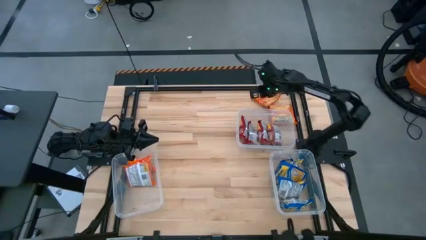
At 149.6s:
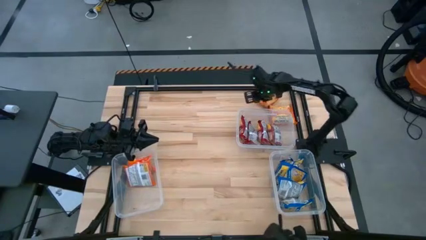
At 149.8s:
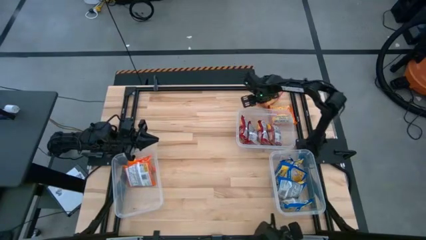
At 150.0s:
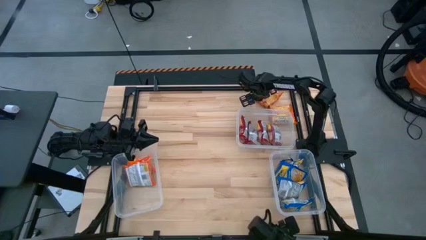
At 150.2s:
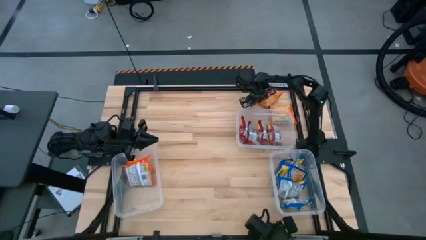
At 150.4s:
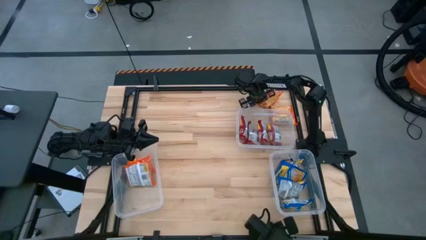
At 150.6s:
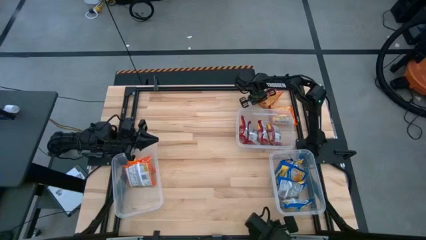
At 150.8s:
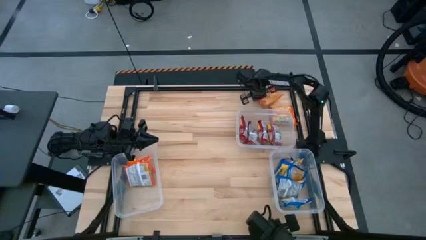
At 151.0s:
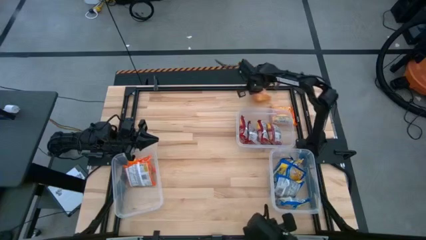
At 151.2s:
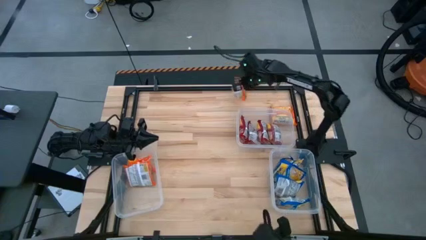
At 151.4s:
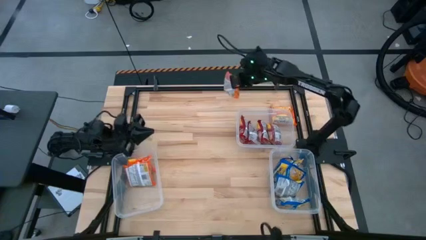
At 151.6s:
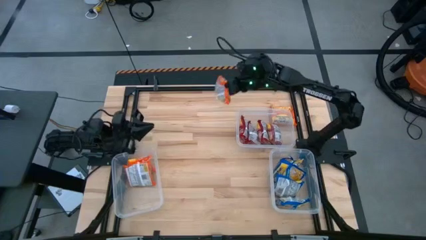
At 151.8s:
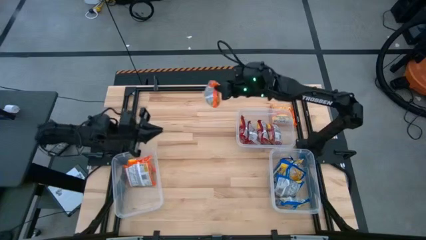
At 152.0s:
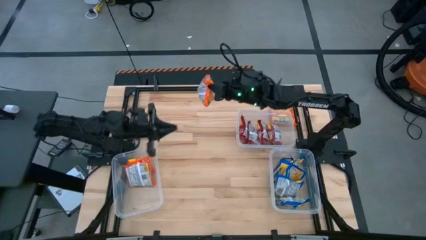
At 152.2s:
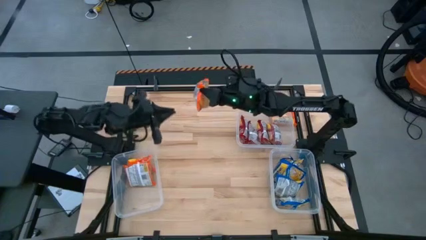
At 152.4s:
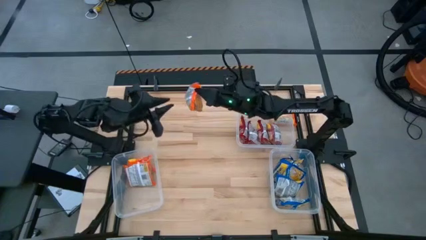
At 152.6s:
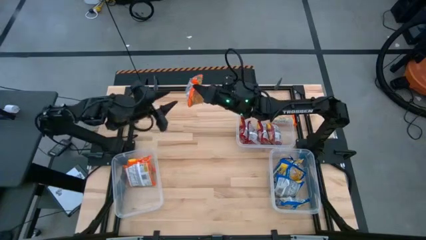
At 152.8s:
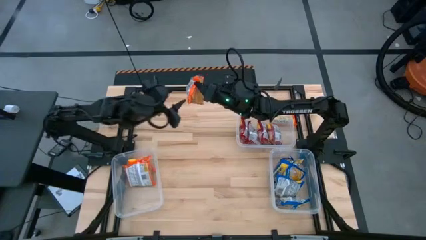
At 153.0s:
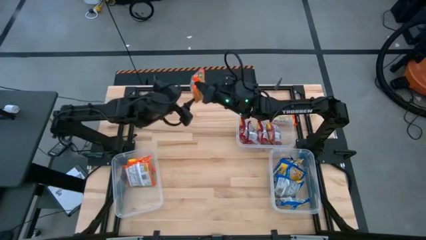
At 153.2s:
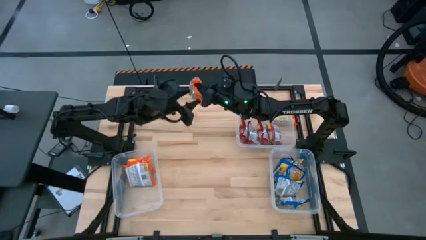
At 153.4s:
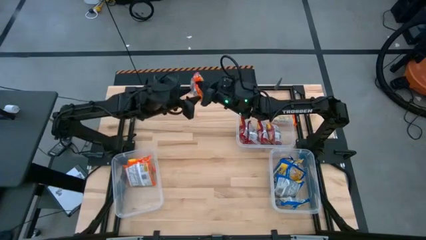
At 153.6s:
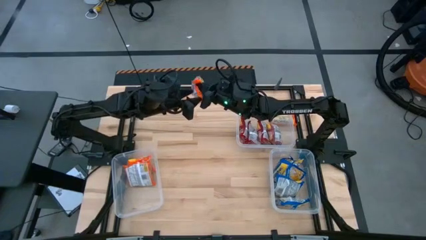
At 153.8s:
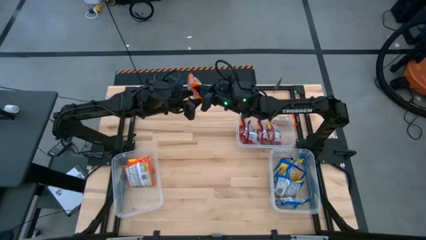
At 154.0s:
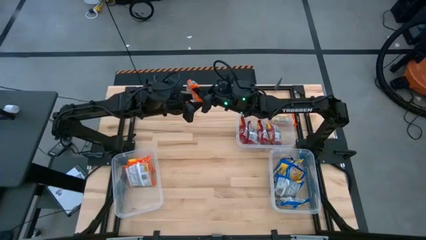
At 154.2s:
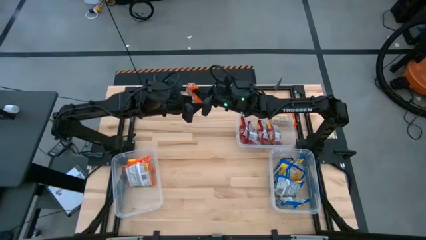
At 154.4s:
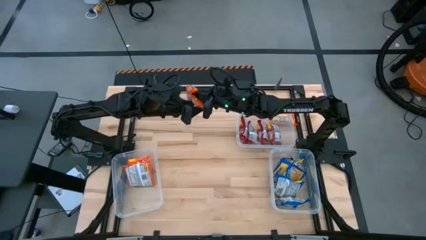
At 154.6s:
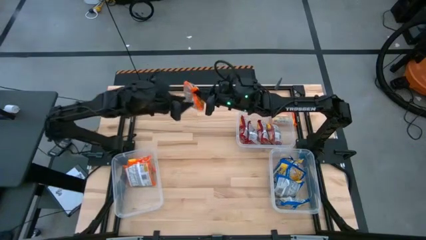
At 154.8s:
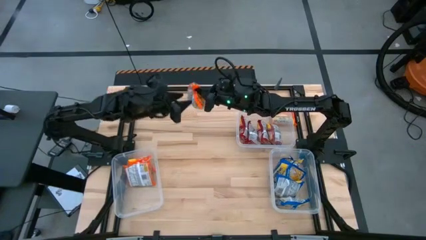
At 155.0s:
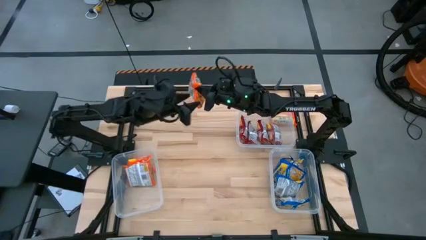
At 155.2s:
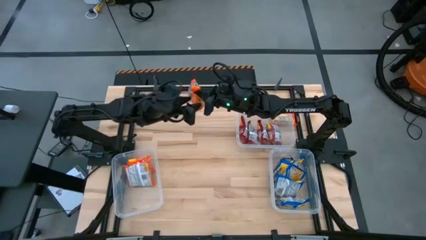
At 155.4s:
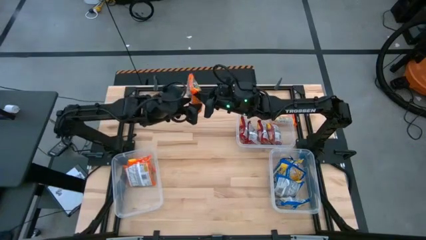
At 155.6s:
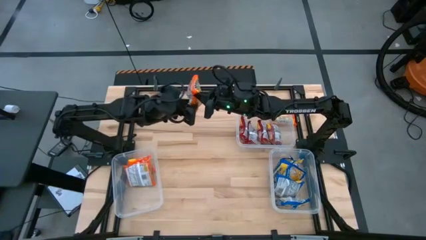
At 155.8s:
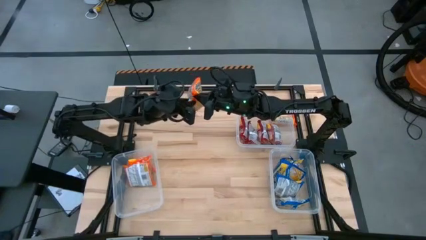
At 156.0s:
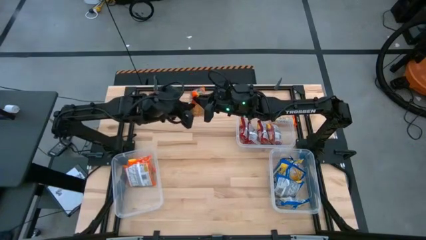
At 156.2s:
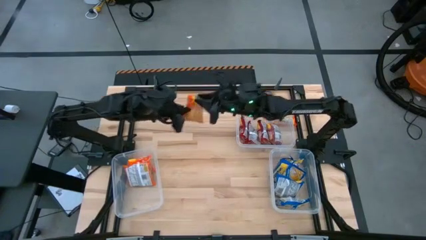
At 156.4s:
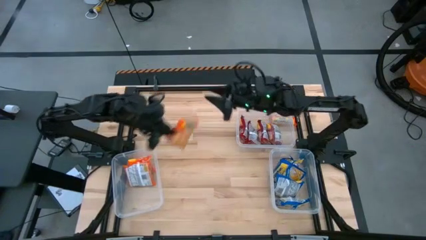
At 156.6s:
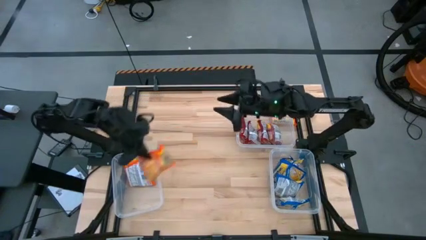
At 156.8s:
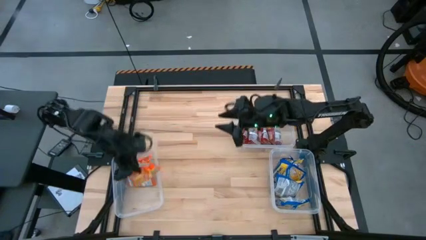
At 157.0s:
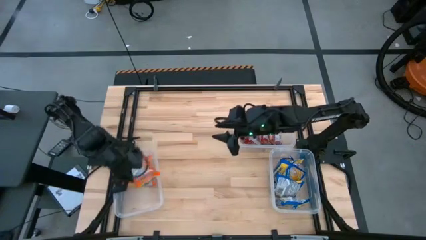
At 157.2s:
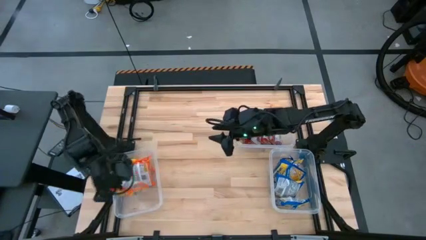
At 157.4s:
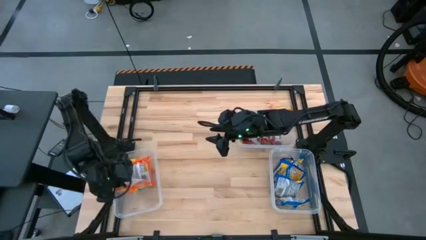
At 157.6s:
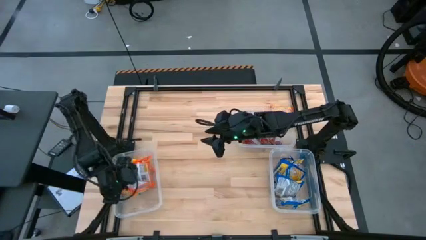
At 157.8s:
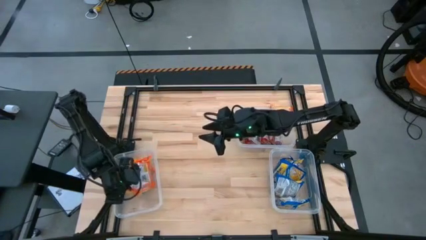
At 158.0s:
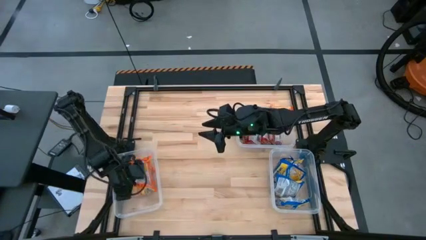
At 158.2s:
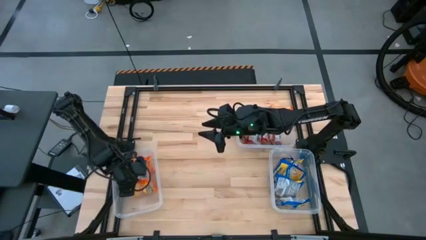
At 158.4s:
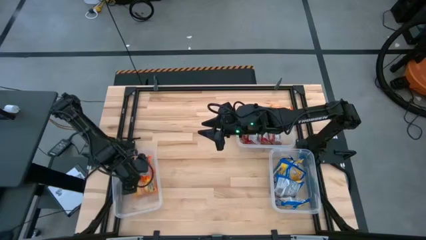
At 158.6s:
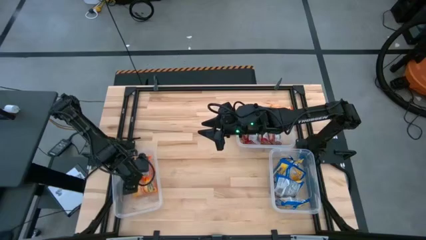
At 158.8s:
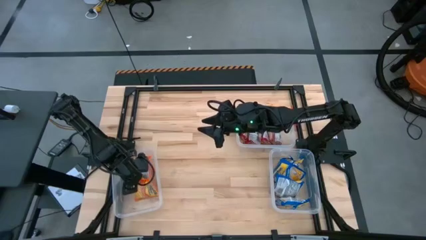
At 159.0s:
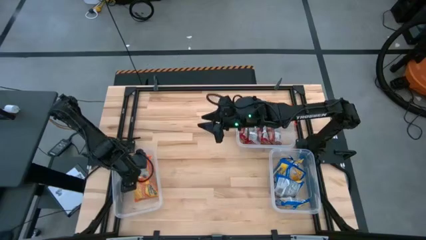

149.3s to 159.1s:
Task: Sort Maruchan noodles
Put the orange noodle pack into the left container

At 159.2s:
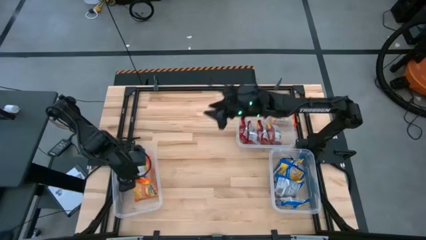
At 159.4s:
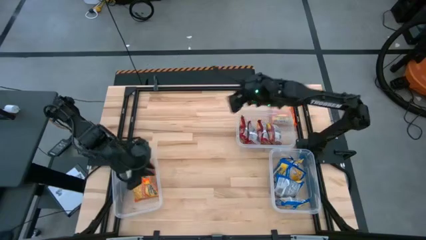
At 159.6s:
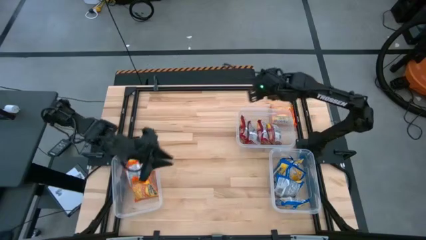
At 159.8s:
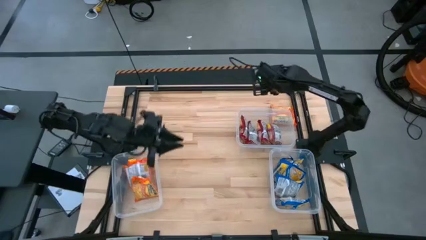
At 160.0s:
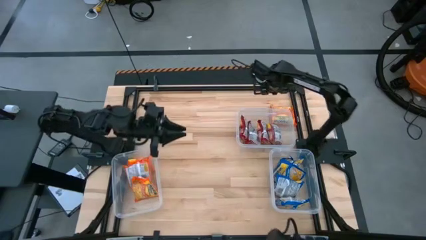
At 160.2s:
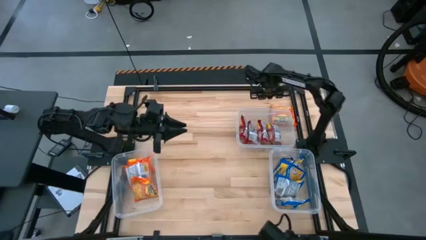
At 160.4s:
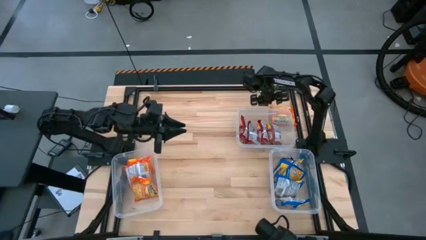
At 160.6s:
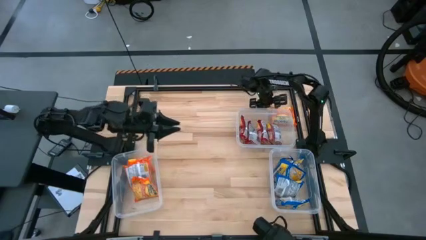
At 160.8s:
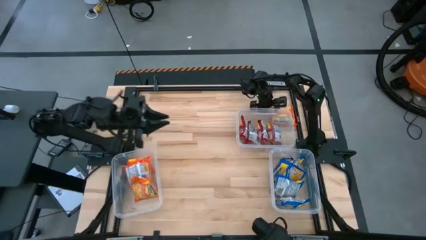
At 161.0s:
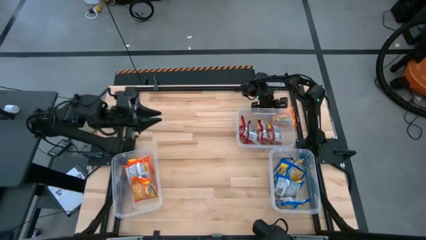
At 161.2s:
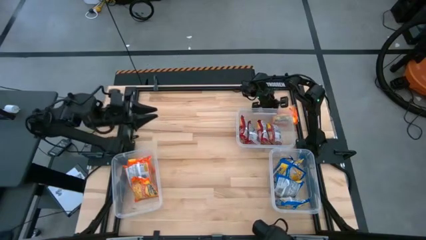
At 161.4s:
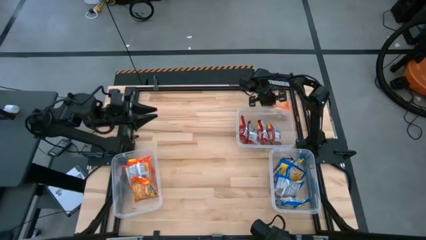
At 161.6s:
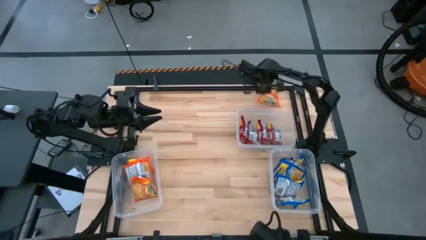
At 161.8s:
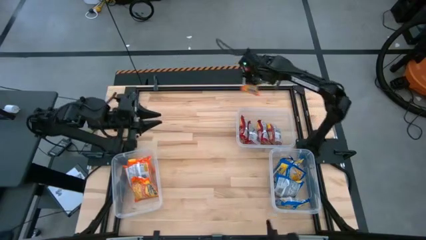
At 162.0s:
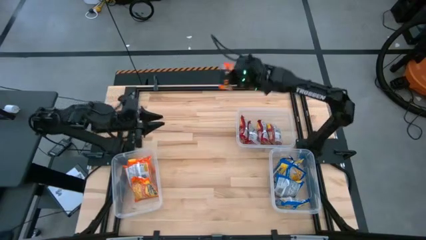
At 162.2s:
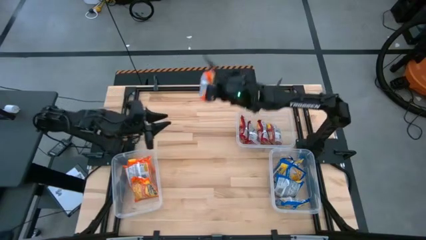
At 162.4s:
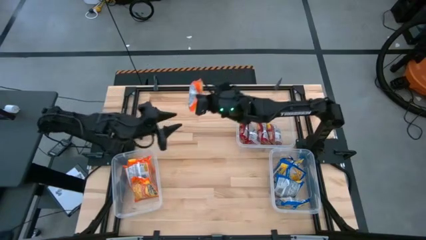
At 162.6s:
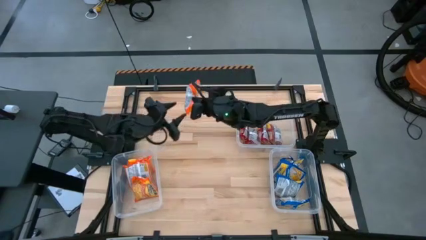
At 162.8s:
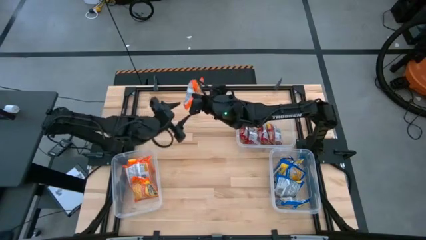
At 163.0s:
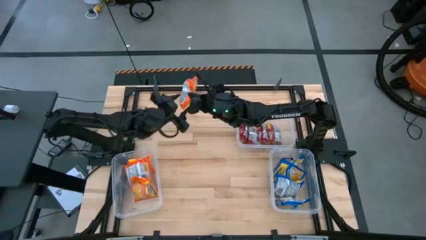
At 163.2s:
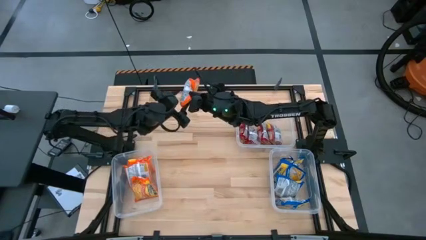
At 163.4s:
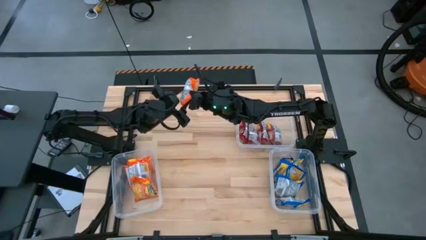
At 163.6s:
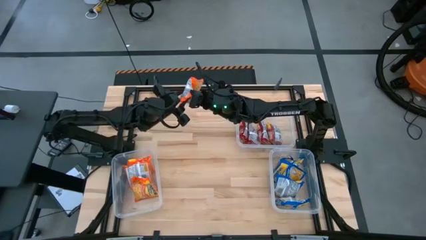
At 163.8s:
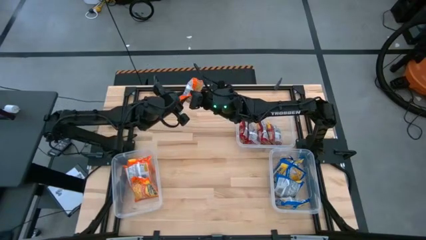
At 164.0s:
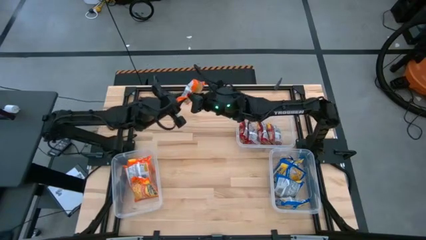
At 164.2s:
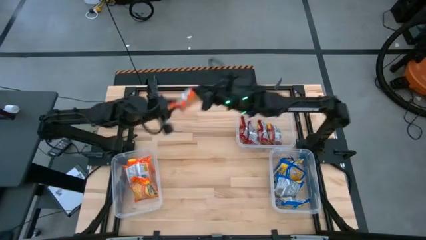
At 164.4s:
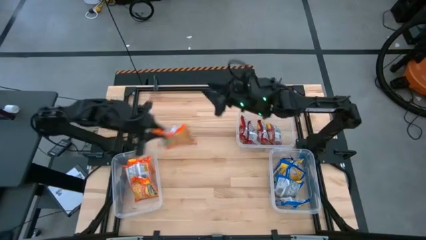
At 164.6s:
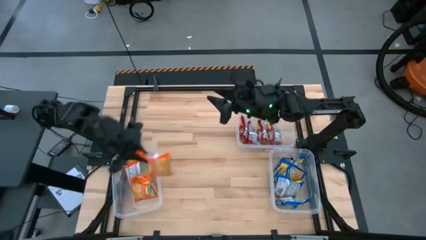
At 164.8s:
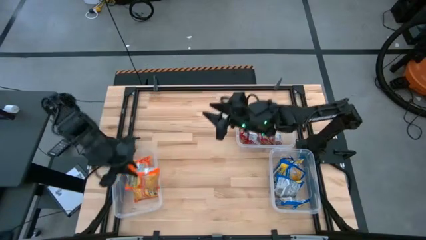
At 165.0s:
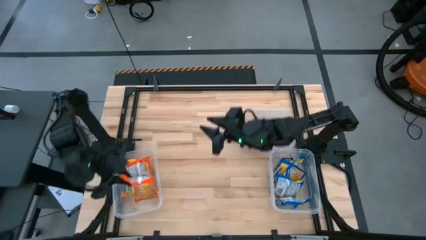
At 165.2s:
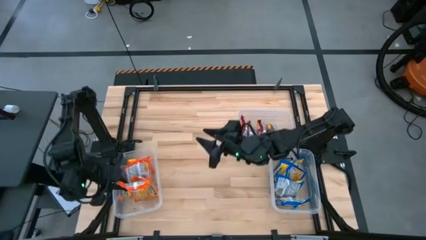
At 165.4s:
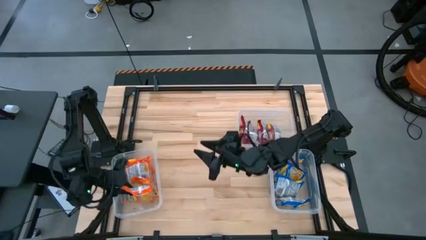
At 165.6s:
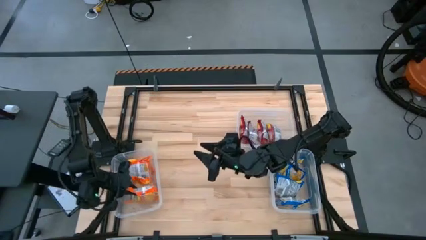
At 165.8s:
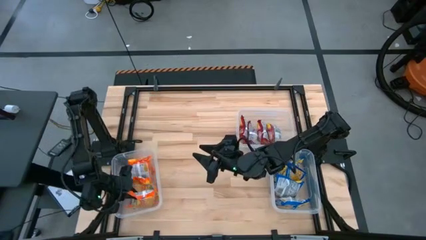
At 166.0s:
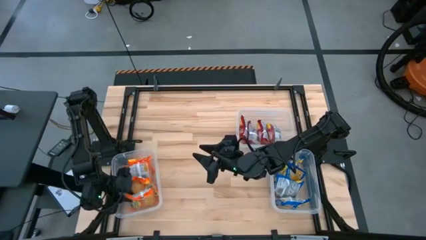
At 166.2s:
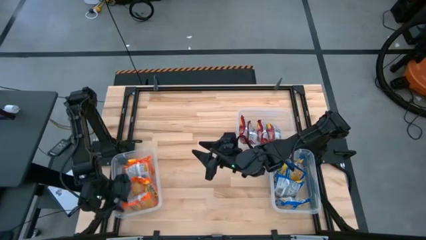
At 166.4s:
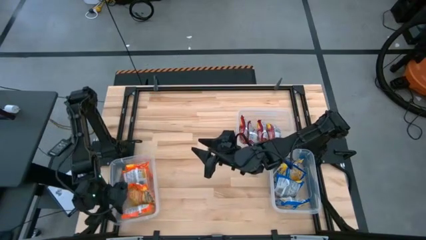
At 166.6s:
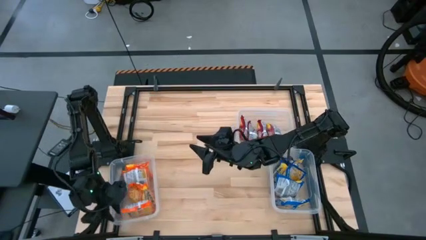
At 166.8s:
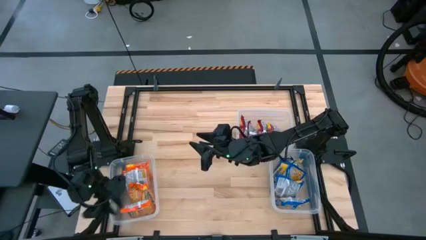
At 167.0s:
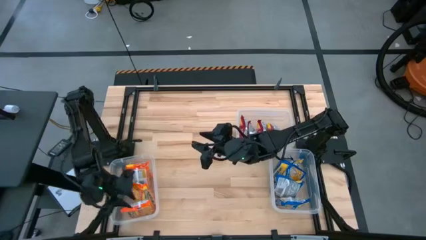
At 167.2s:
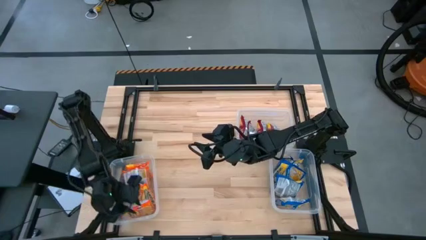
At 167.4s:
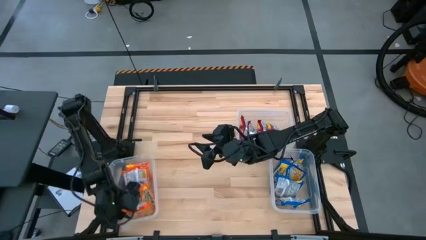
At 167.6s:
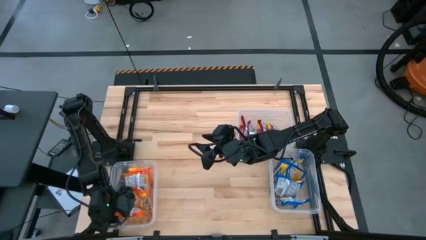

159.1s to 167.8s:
Put the orange noodle pack into the left container
